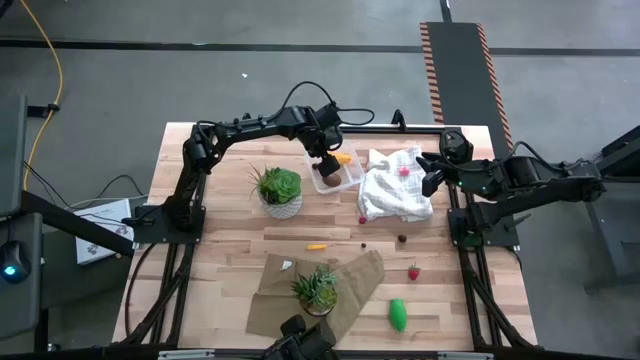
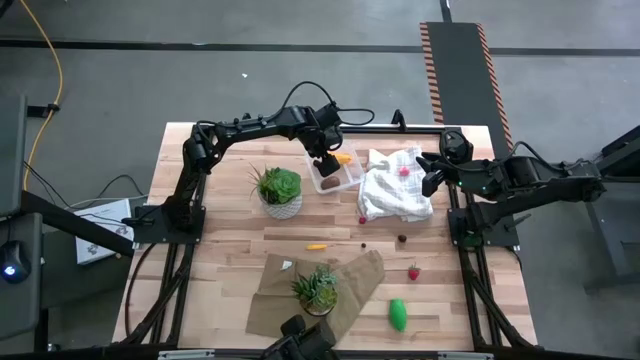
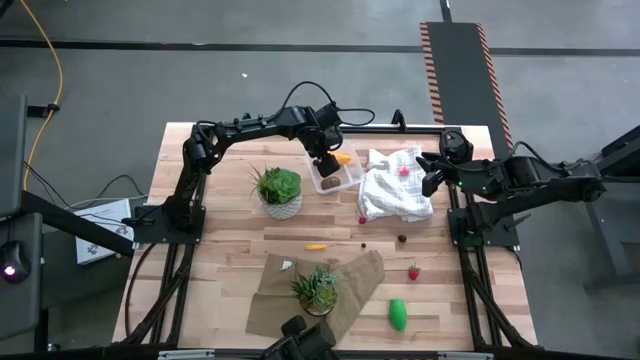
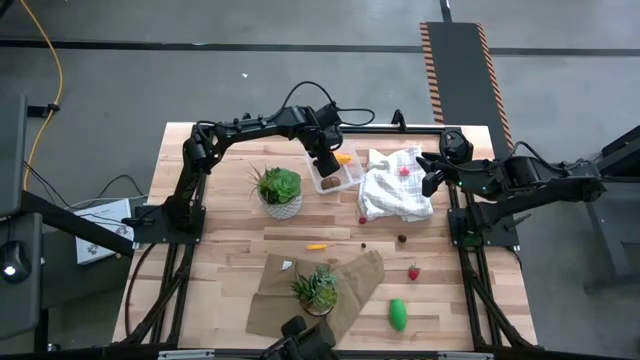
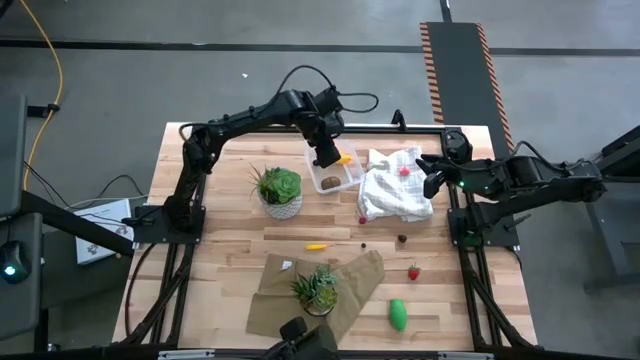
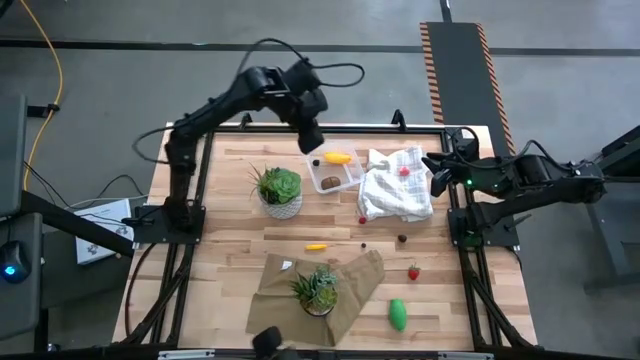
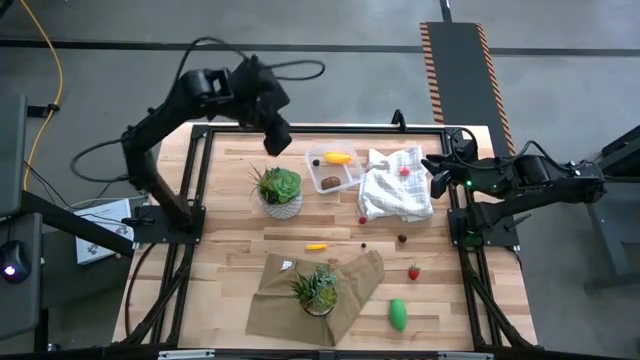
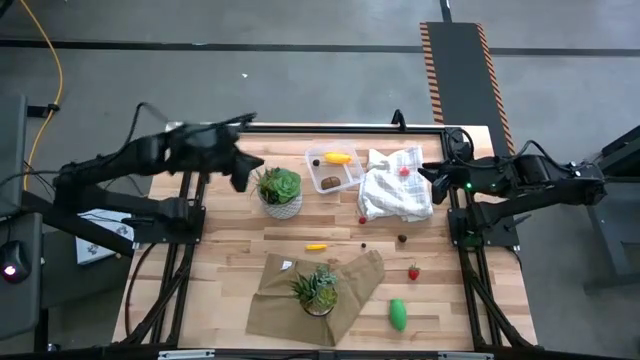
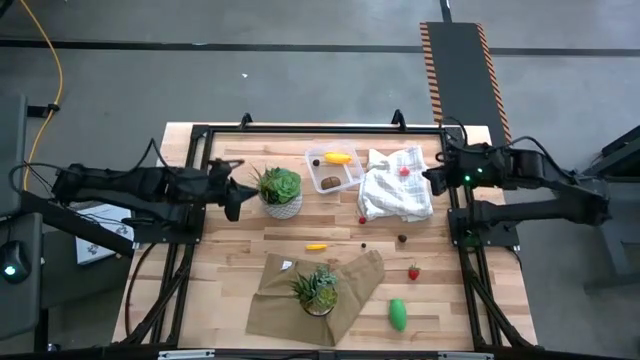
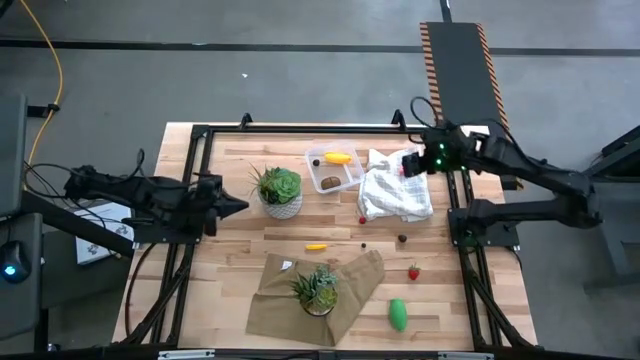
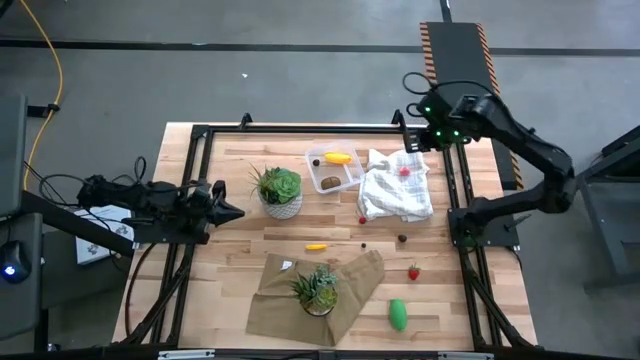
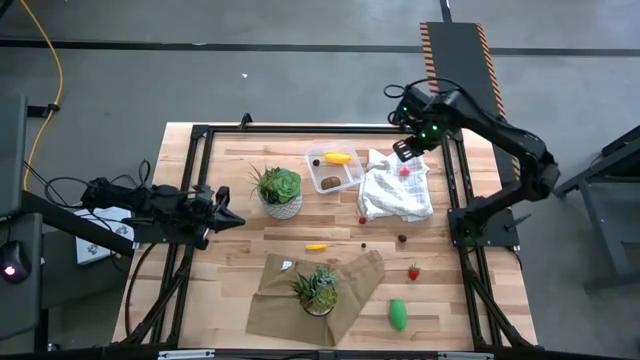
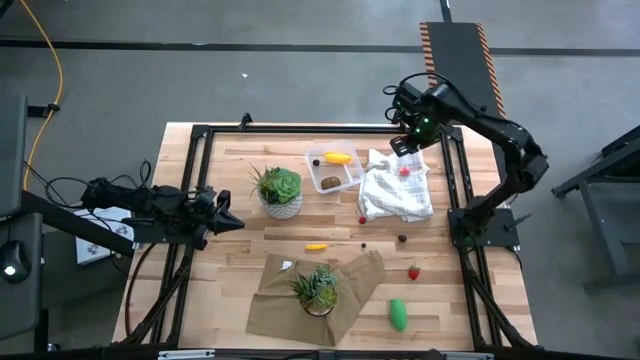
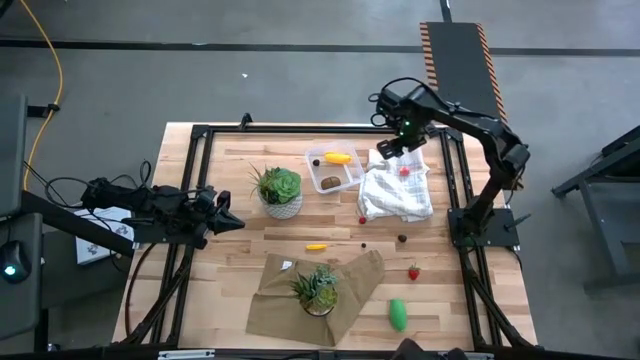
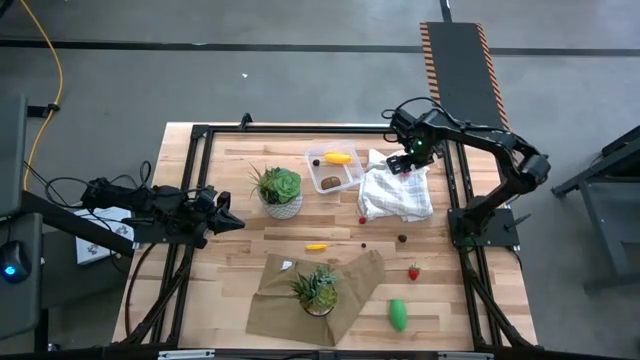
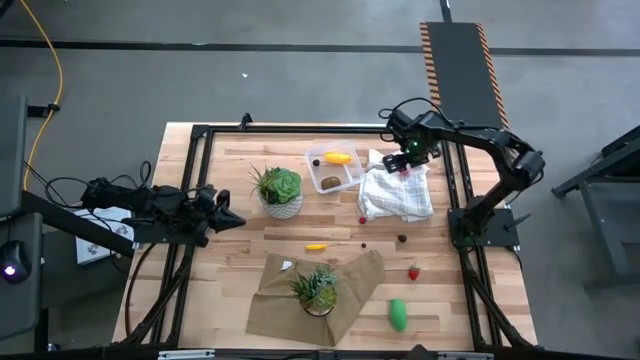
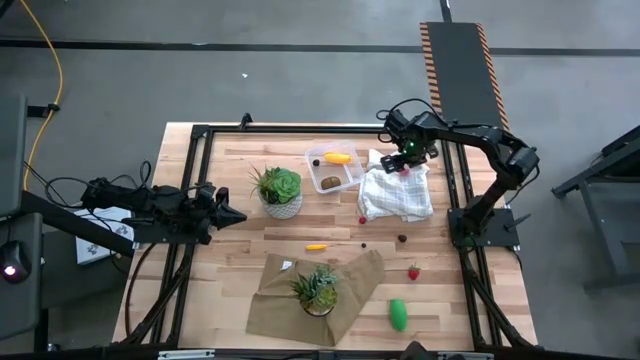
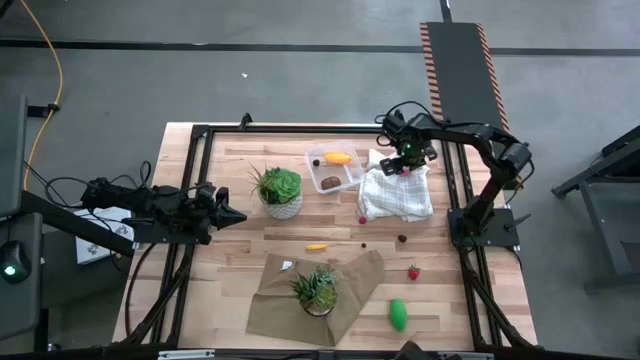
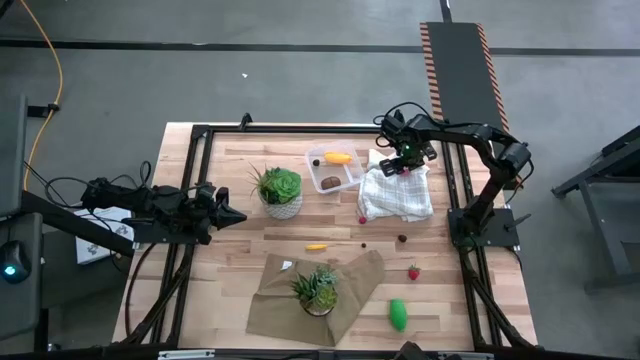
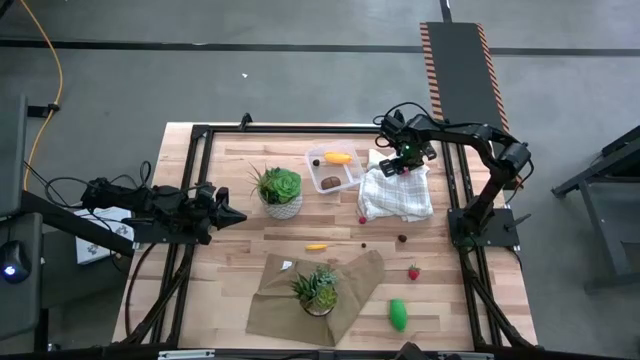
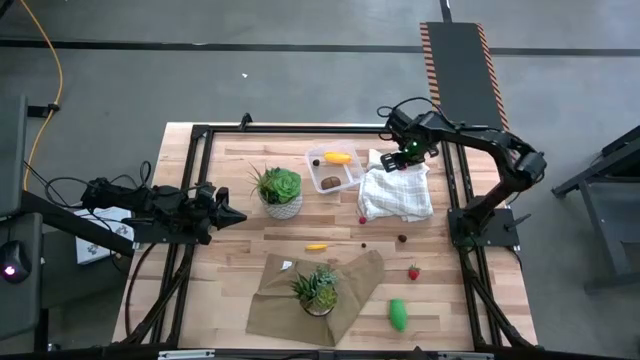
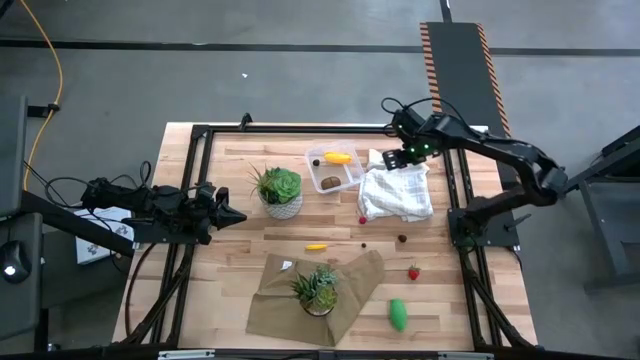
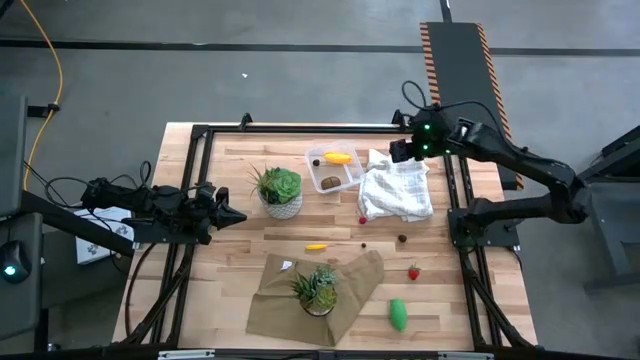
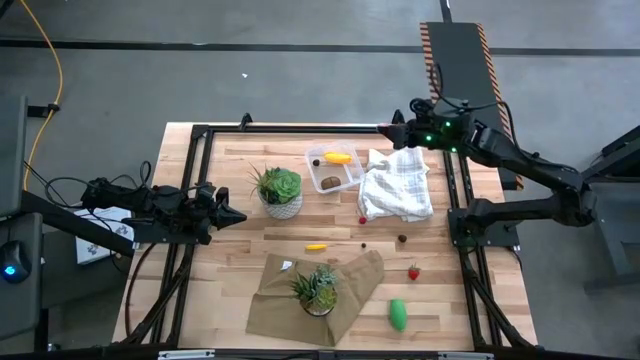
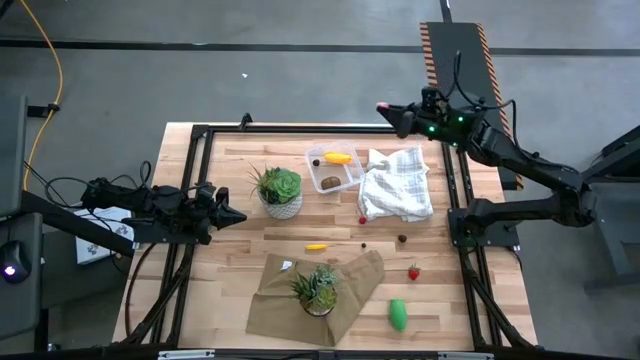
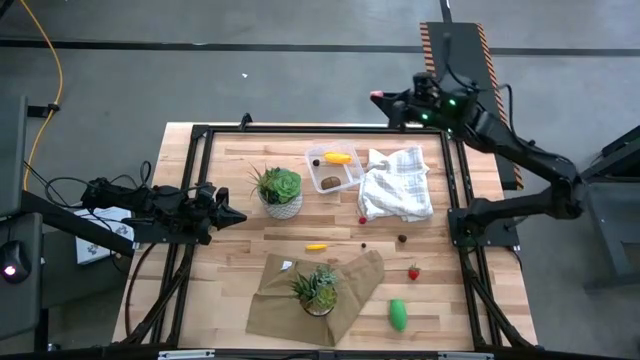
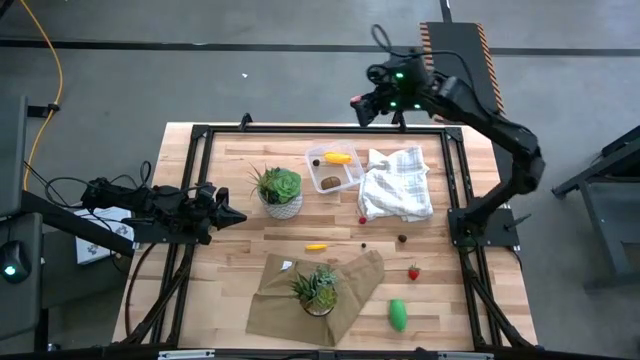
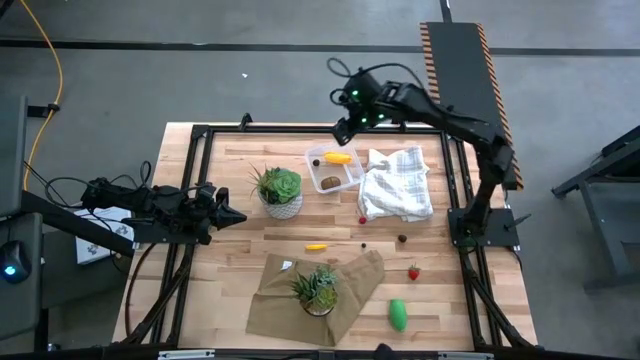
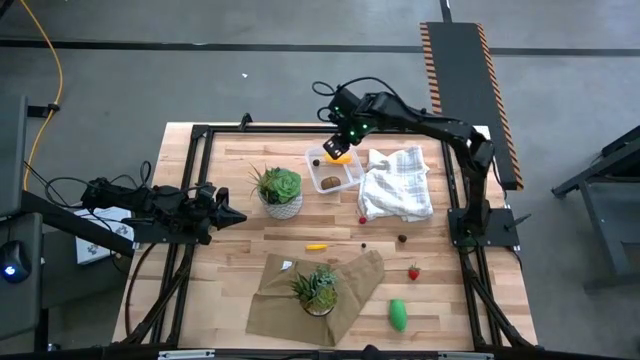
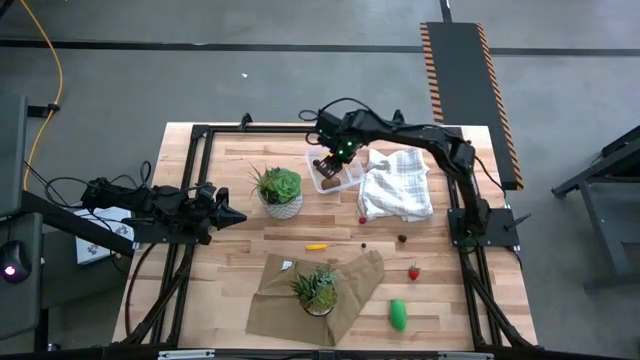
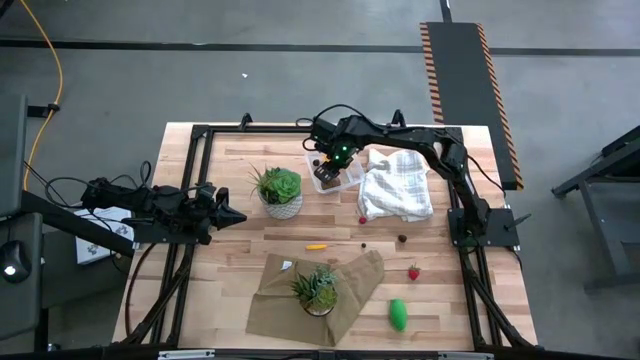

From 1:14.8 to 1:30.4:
Task: Pick and placing Produce into tupperware
Put the pink peach into the transparent bin

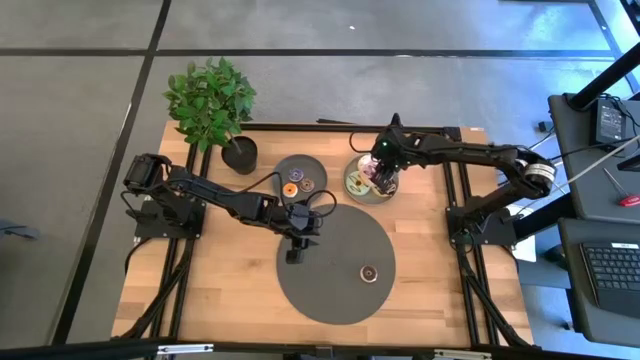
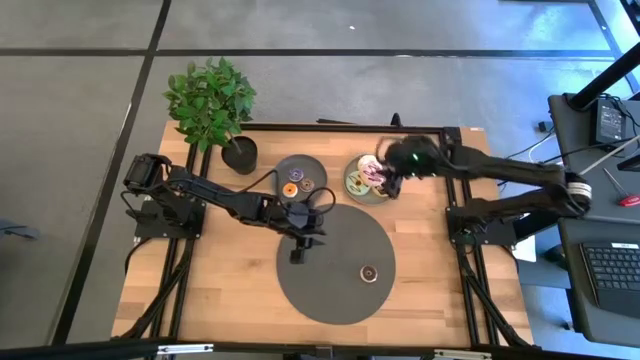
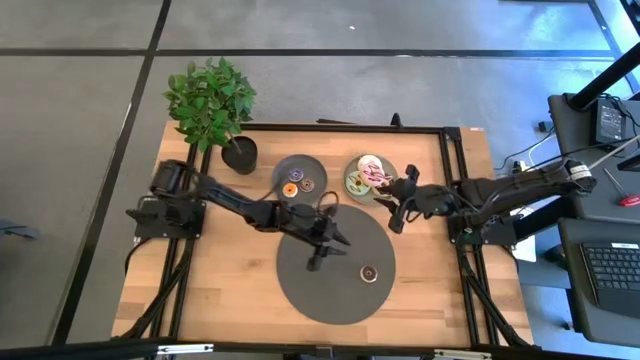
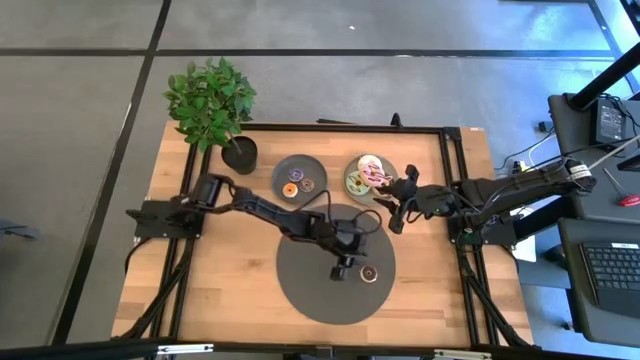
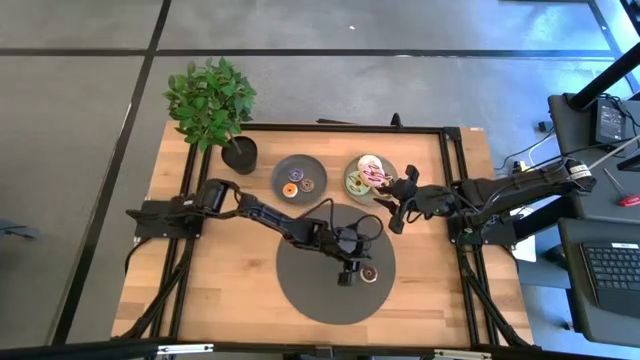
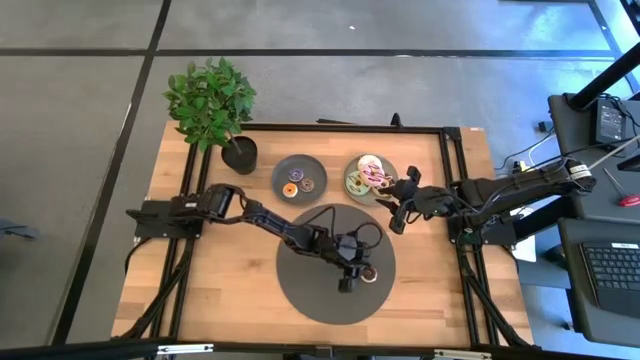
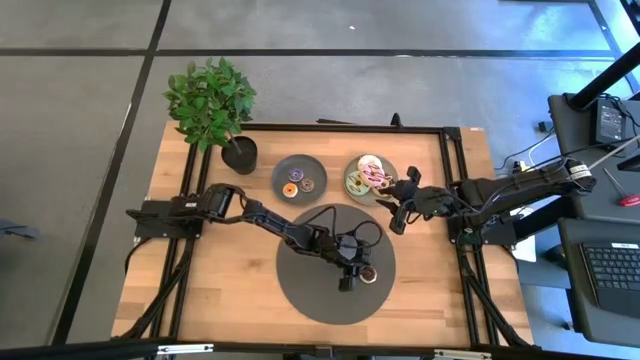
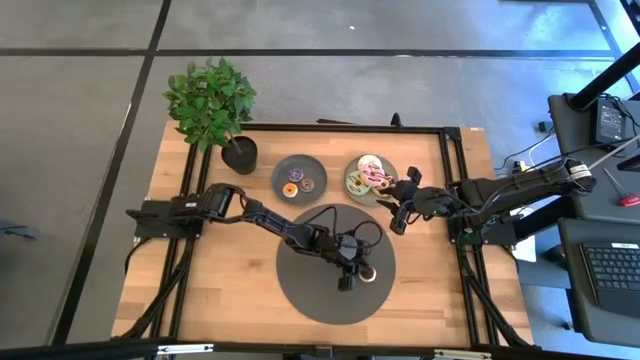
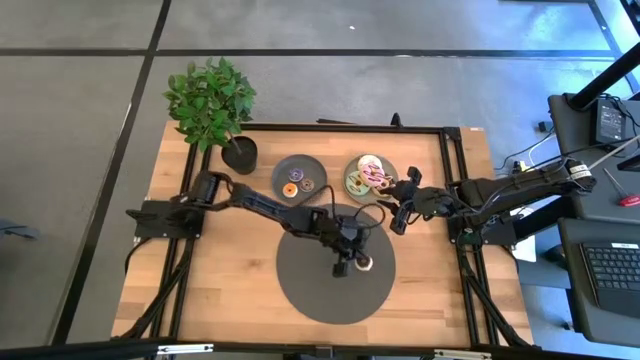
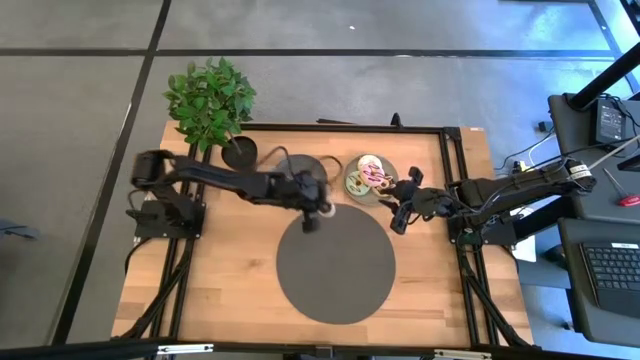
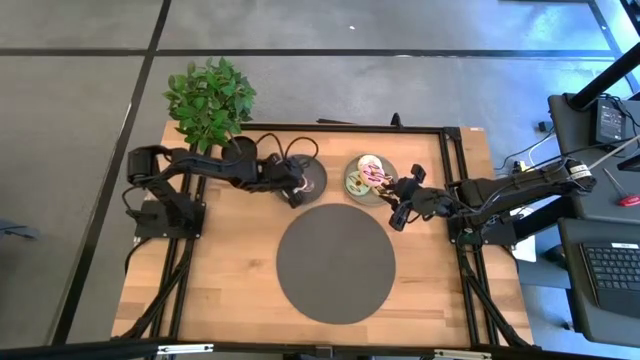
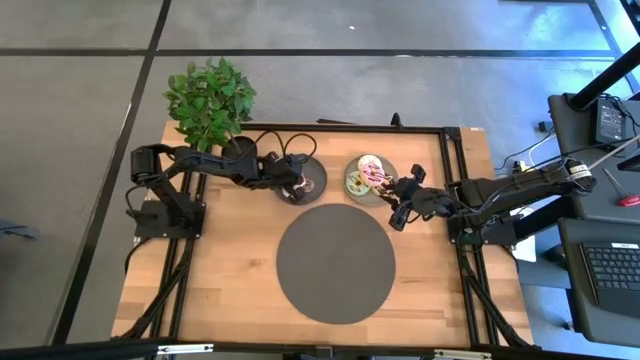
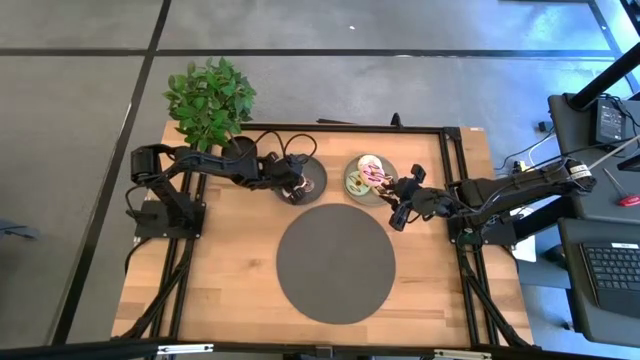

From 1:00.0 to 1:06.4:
Task: Pick & Place donuts
Put the small dark brown on the dark gray plate
